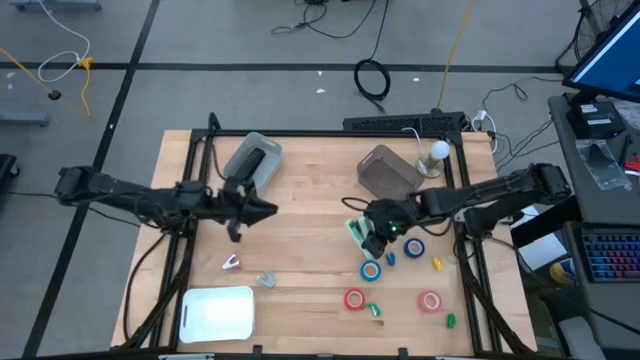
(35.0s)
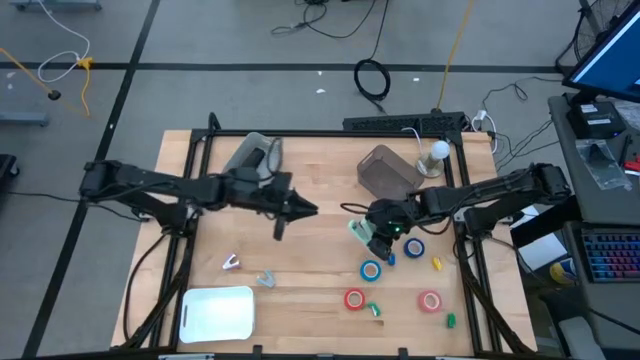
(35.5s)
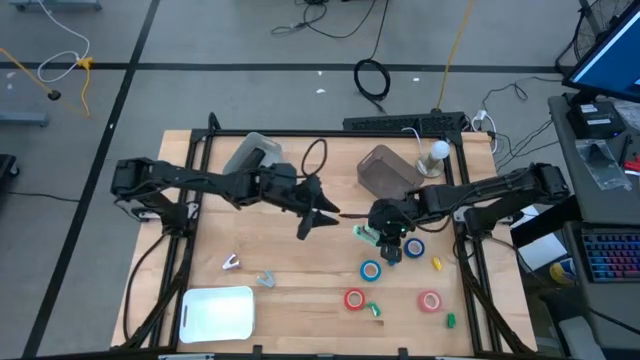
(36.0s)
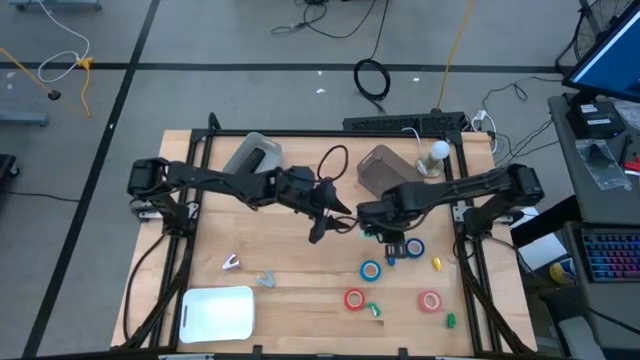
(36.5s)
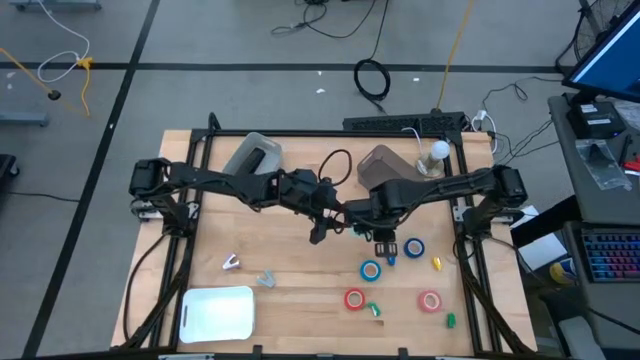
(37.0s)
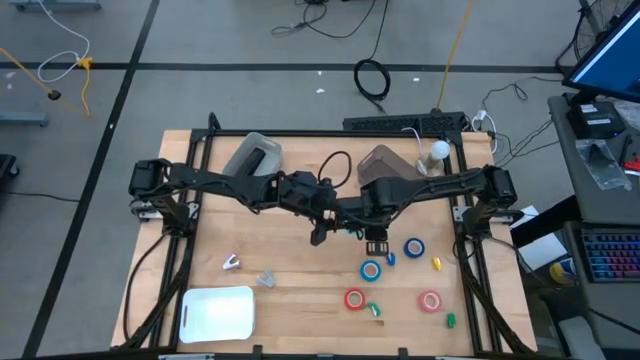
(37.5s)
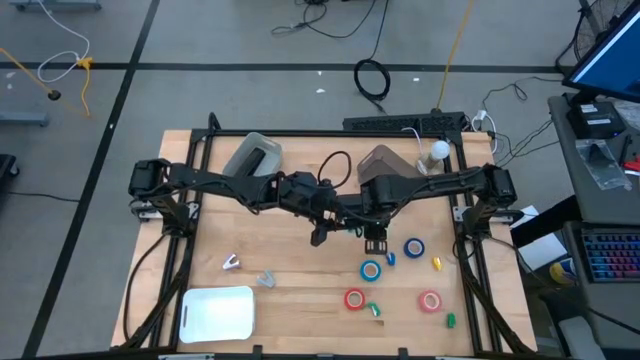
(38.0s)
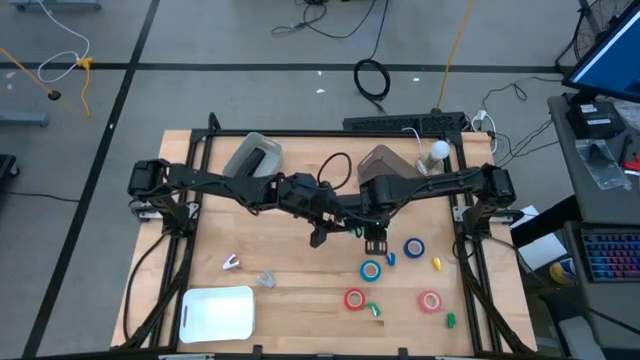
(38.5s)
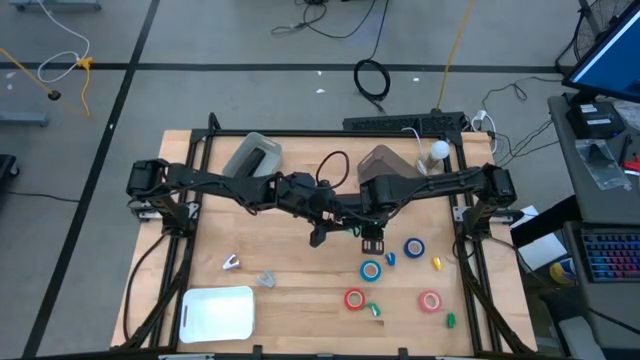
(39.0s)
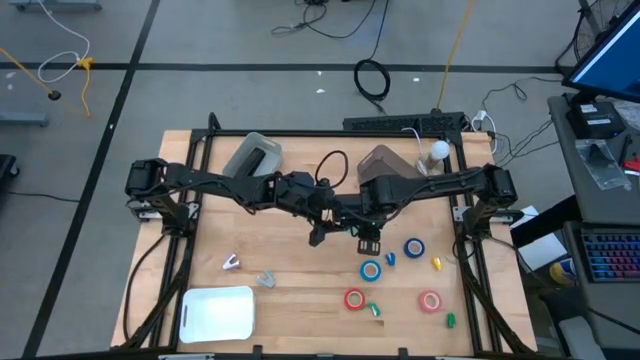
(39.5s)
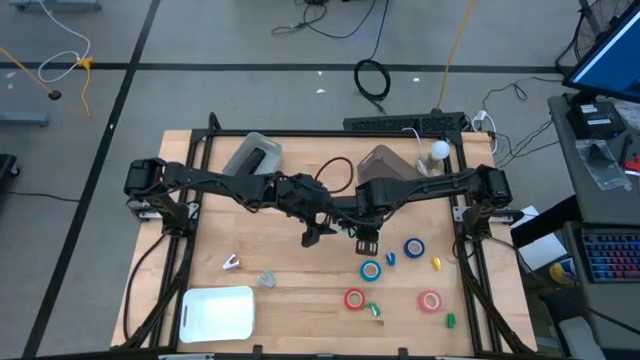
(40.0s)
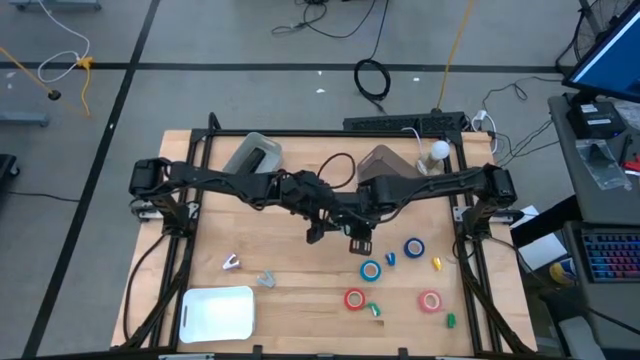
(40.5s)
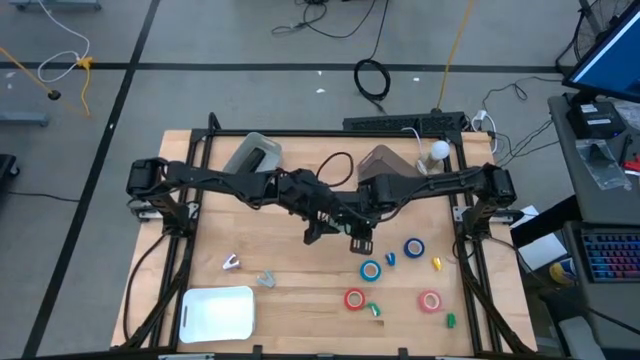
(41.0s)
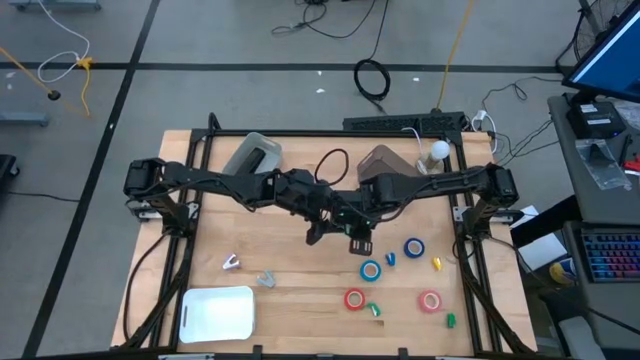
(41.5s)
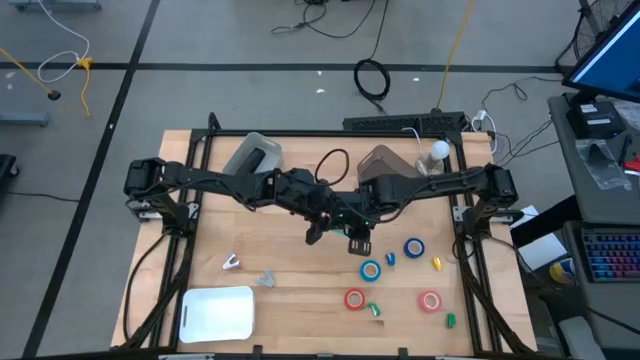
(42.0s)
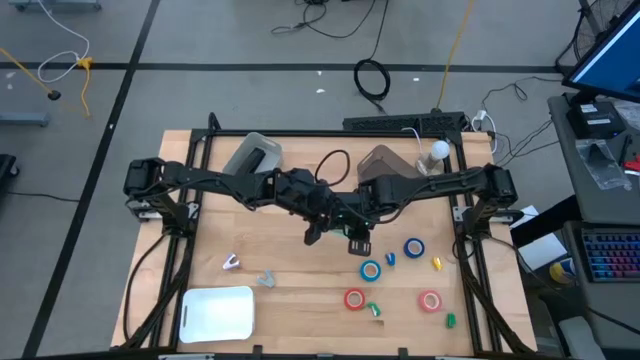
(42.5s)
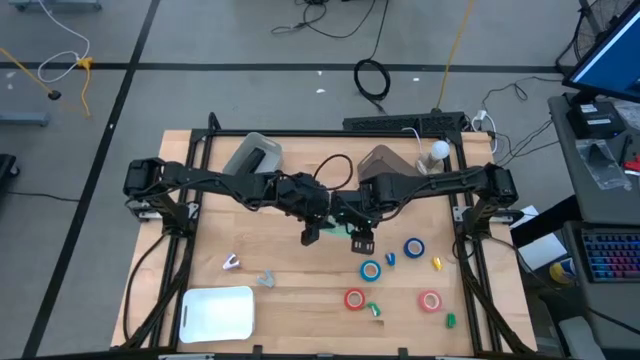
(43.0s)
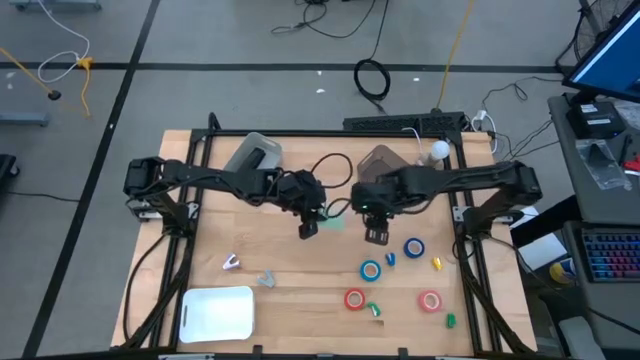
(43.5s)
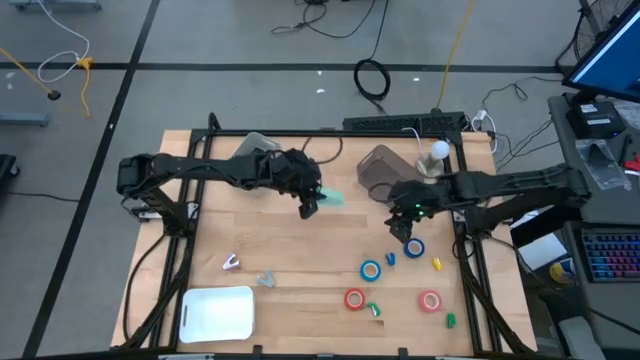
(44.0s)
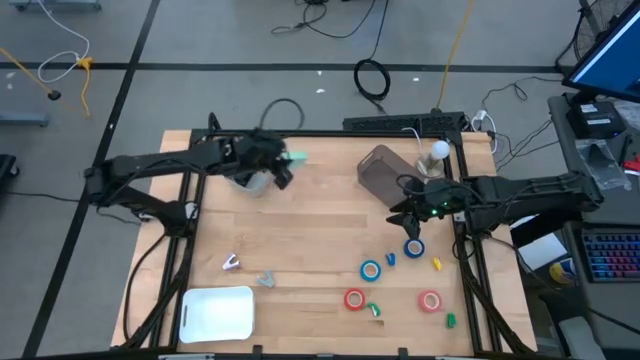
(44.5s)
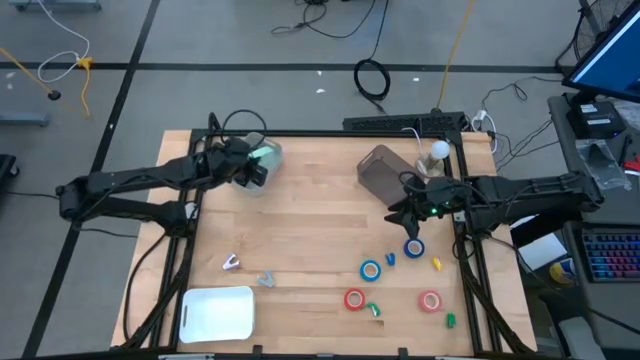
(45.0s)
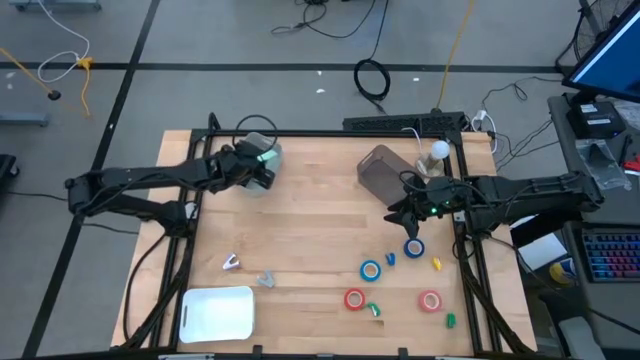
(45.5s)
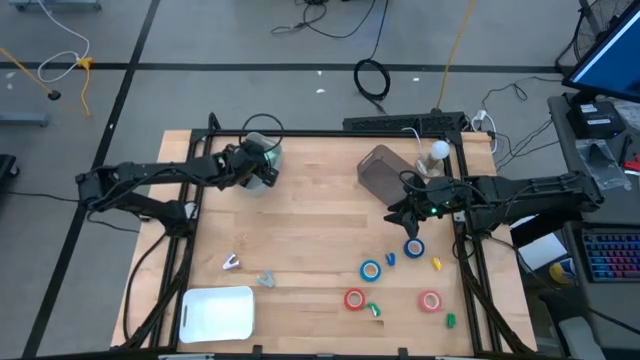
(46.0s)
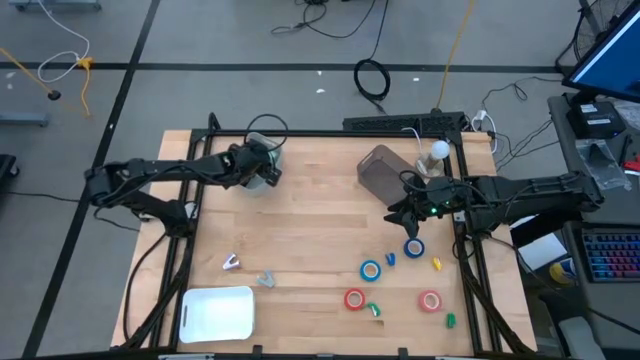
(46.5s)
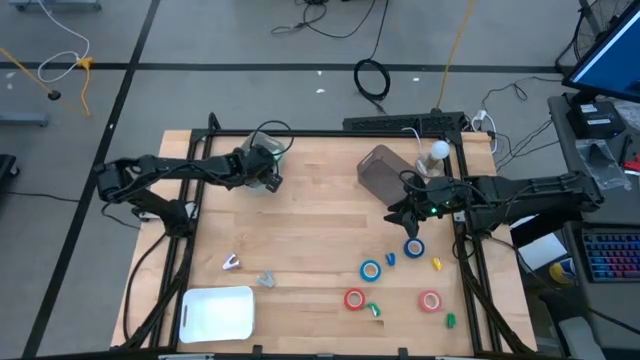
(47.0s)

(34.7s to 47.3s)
Task: Pick and place Stapler, Stapler remover, tape
Put the green stapler into the gray bin

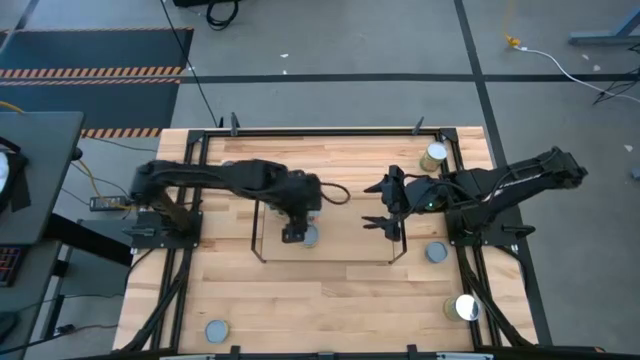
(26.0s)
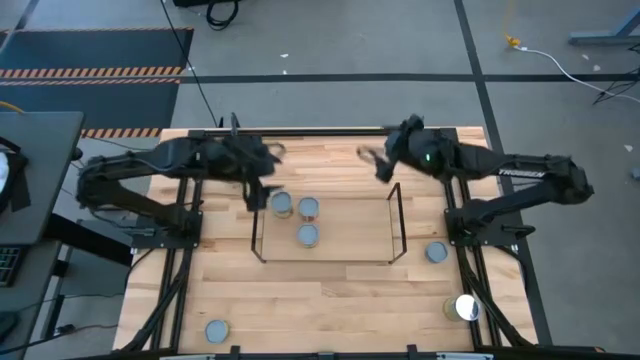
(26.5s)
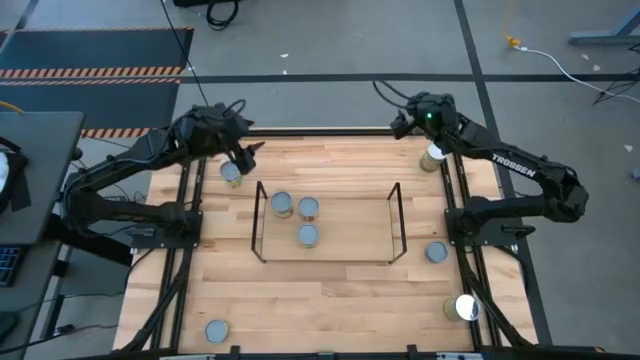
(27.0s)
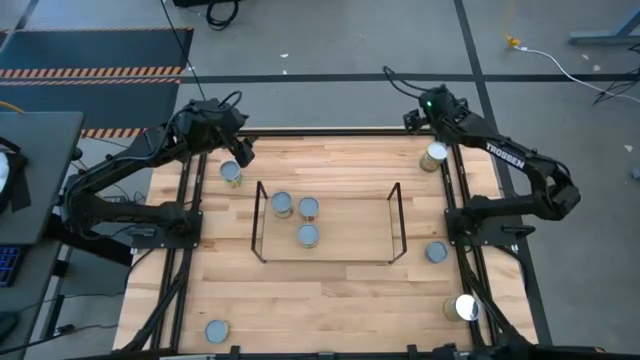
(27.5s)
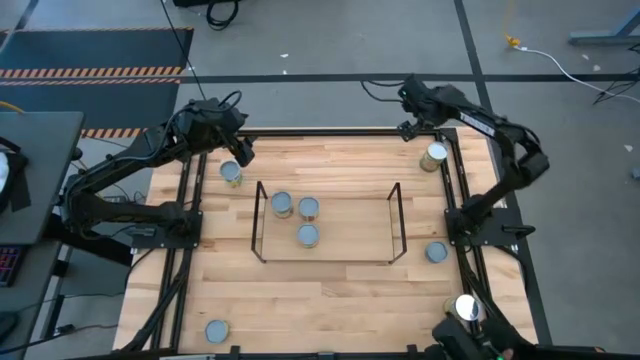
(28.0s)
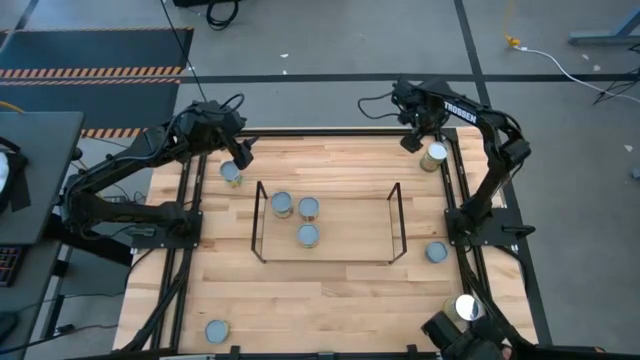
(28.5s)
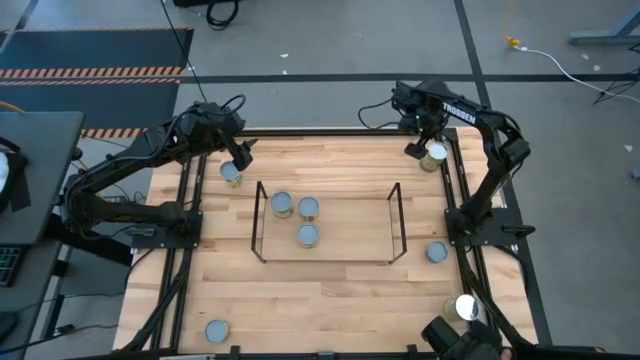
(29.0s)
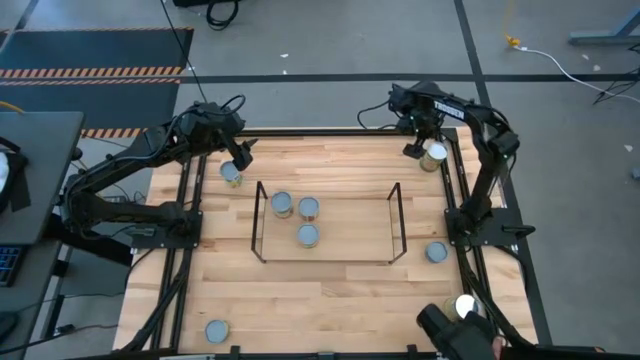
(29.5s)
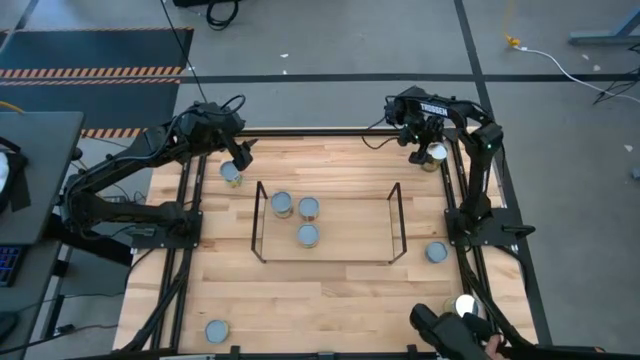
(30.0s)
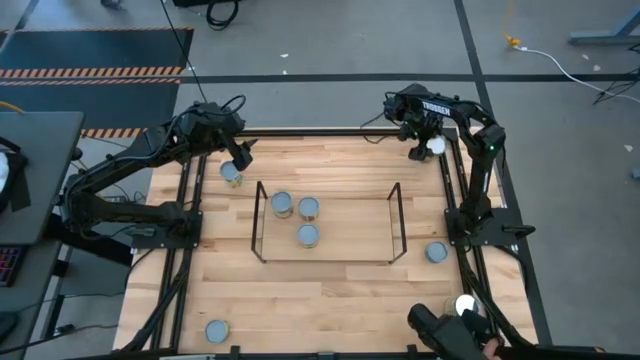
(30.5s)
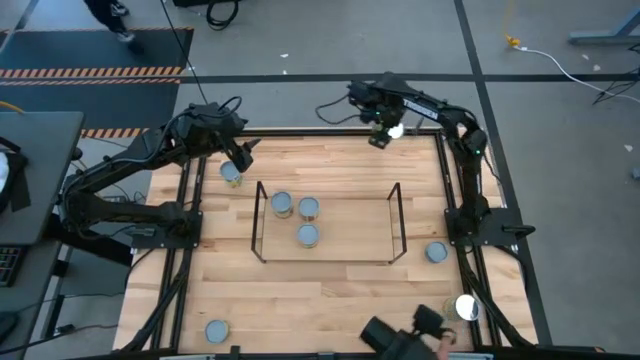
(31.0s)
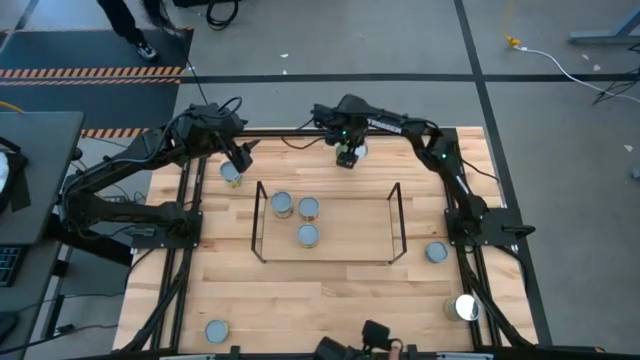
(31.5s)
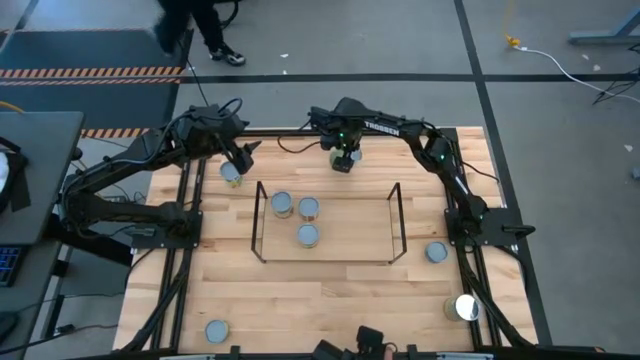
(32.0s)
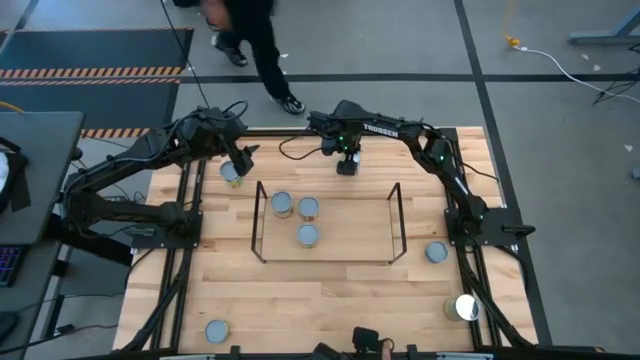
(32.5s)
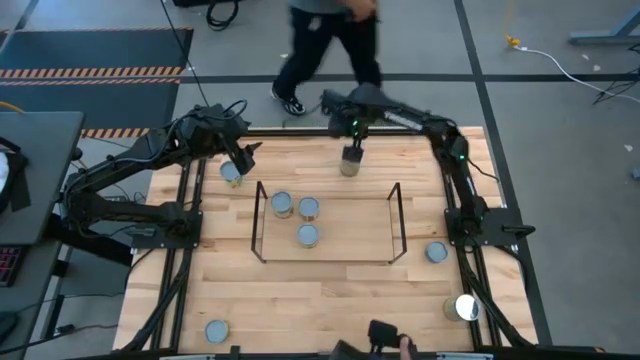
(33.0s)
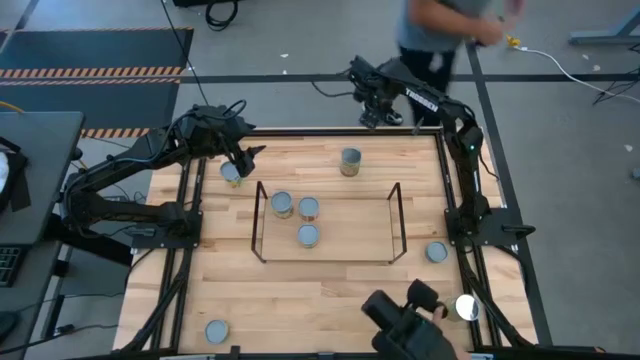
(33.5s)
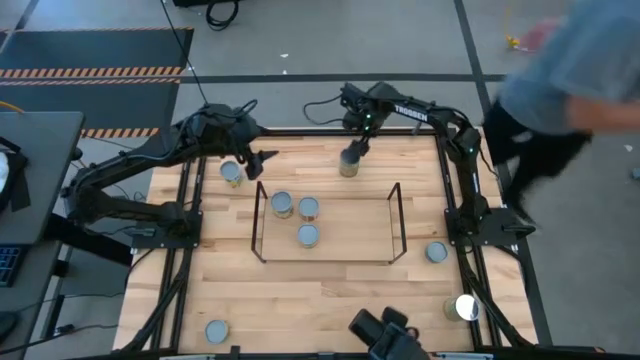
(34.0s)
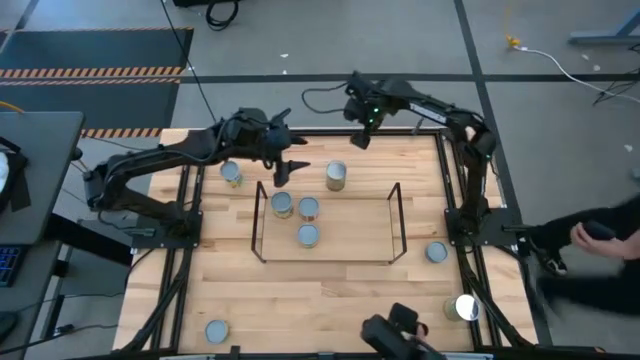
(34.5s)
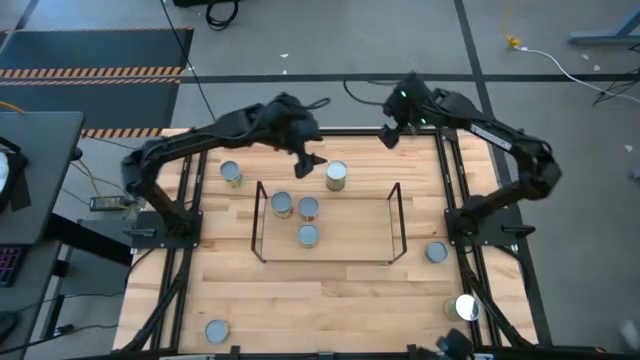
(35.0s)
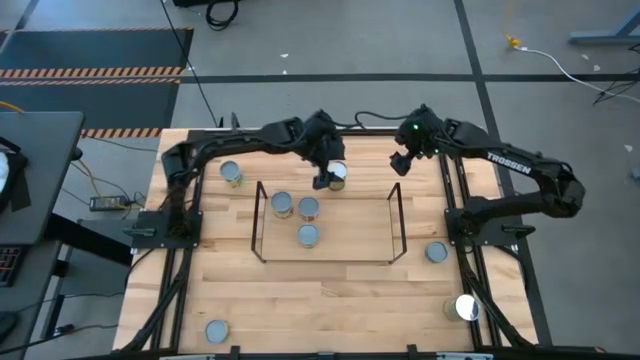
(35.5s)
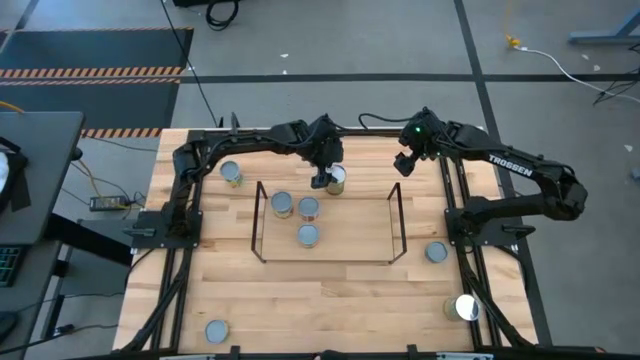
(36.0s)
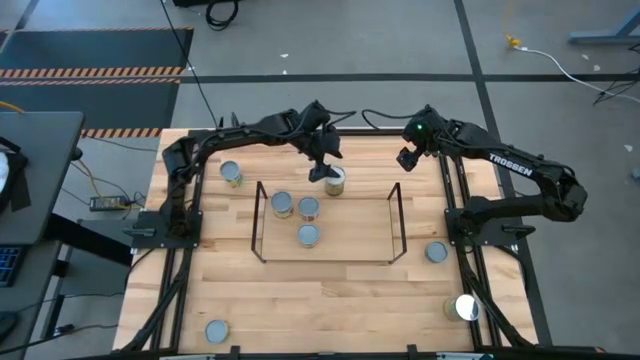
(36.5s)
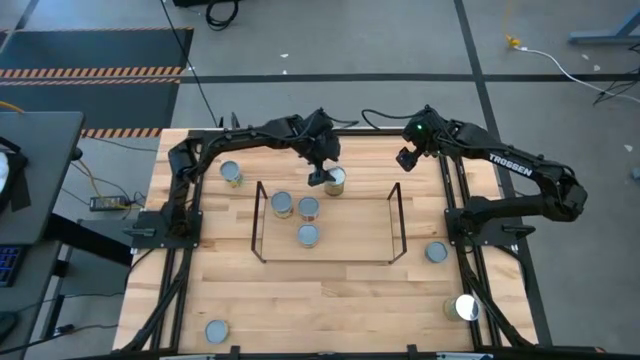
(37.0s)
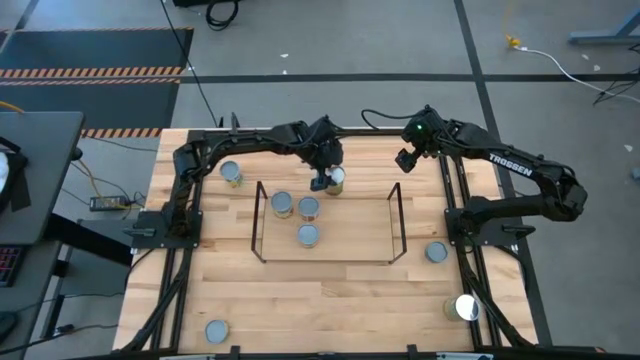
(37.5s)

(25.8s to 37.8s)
Task: Pick and place cans onto a shelf
Put the green can on the shelf
